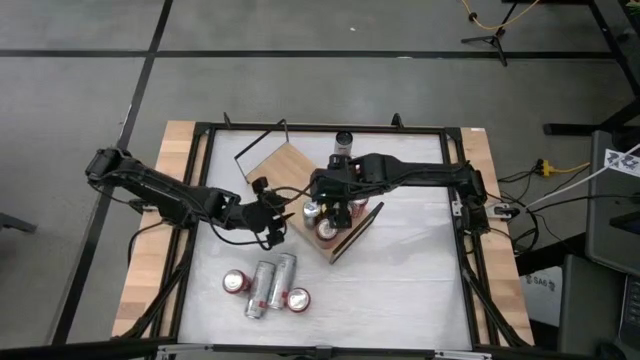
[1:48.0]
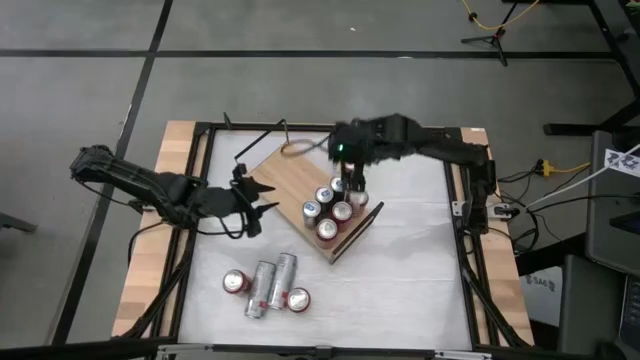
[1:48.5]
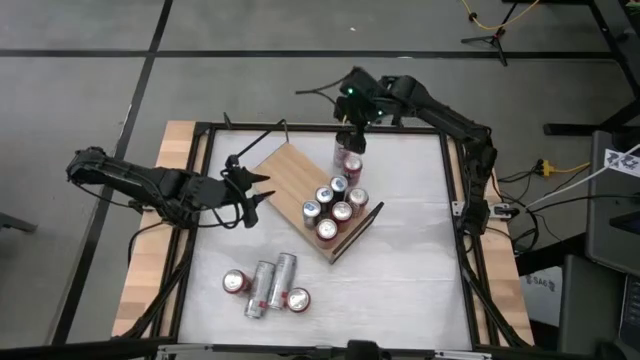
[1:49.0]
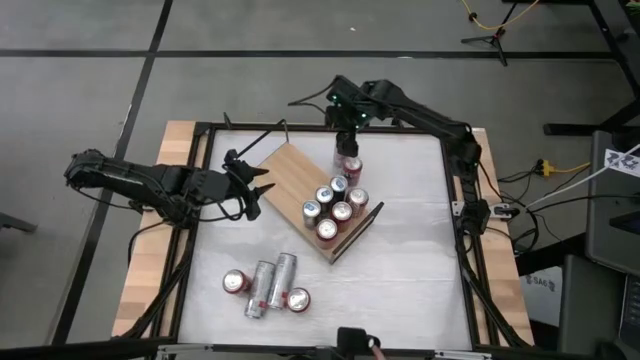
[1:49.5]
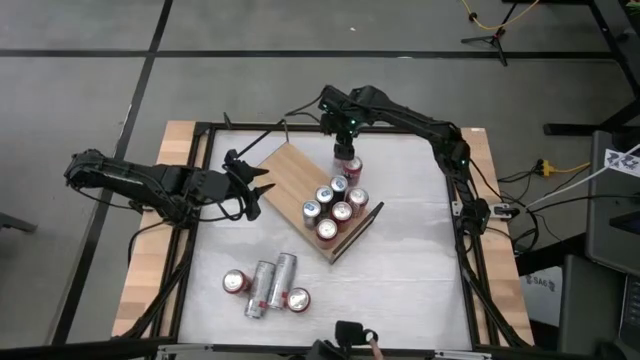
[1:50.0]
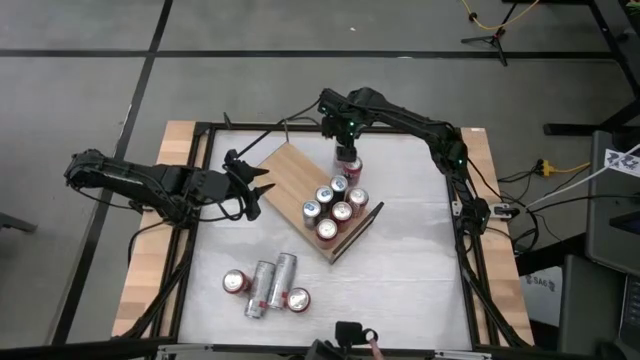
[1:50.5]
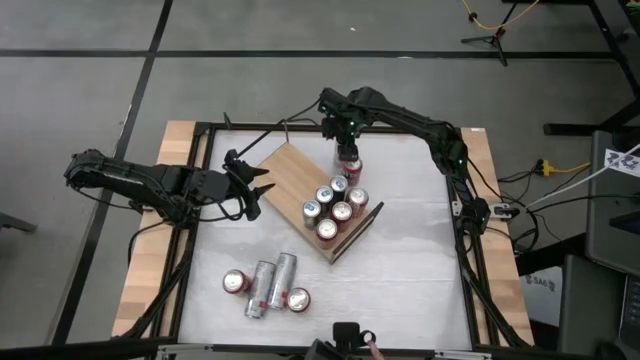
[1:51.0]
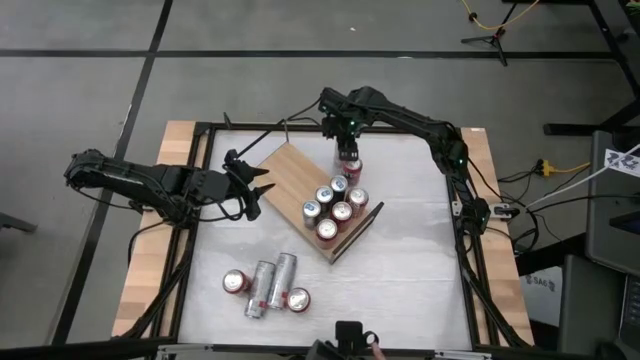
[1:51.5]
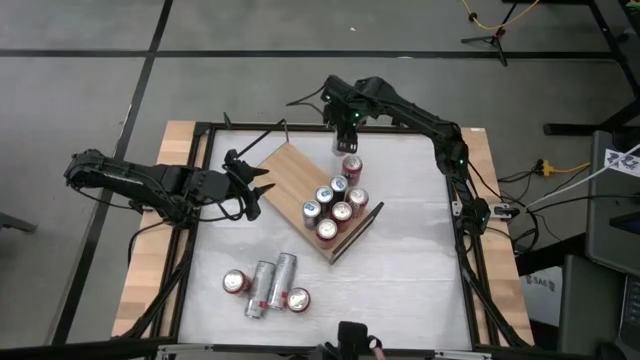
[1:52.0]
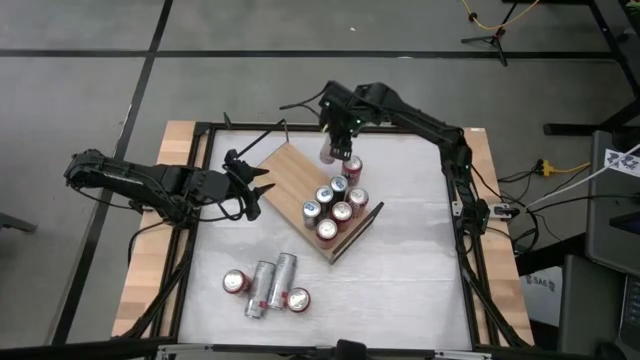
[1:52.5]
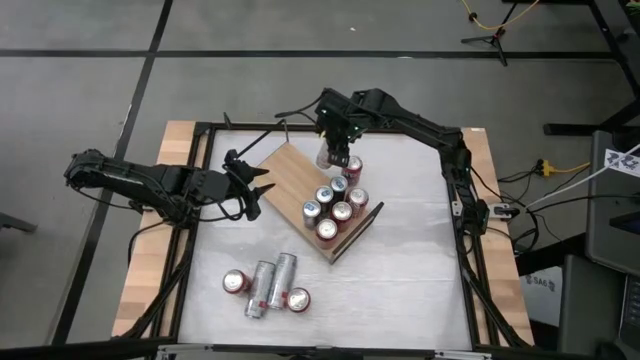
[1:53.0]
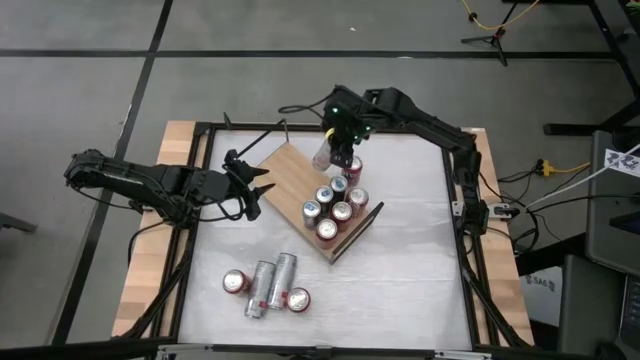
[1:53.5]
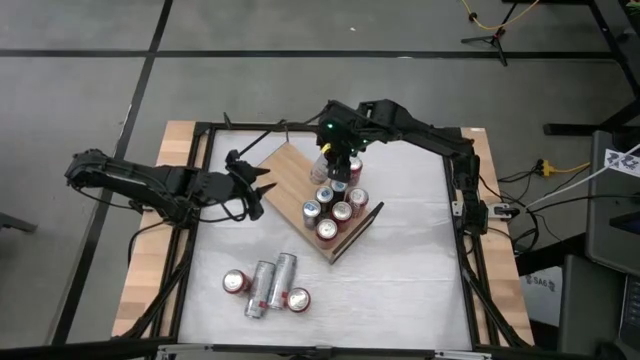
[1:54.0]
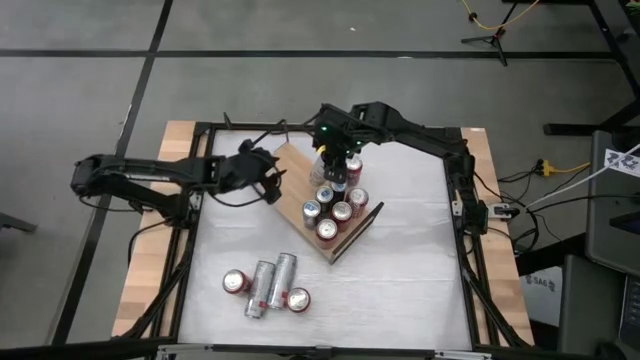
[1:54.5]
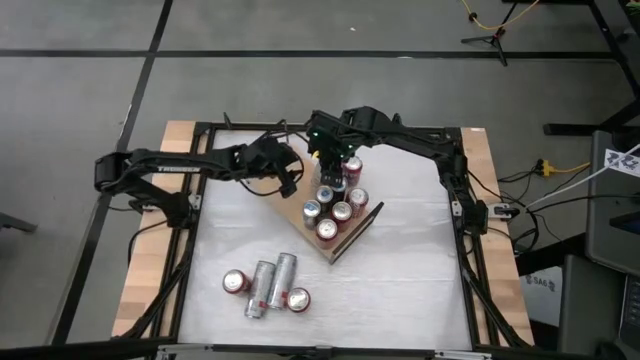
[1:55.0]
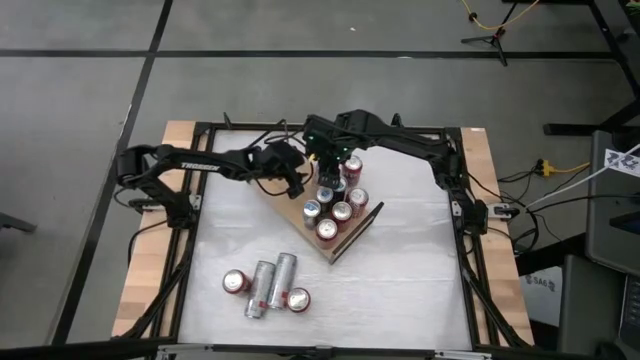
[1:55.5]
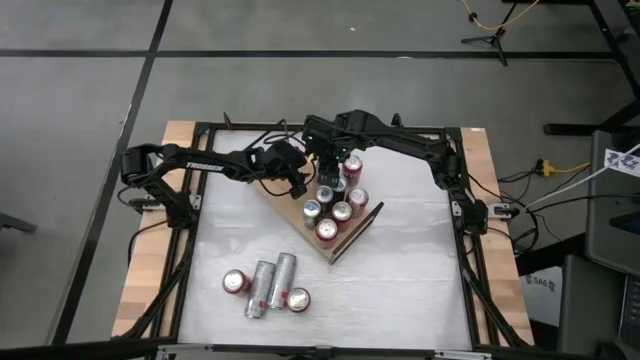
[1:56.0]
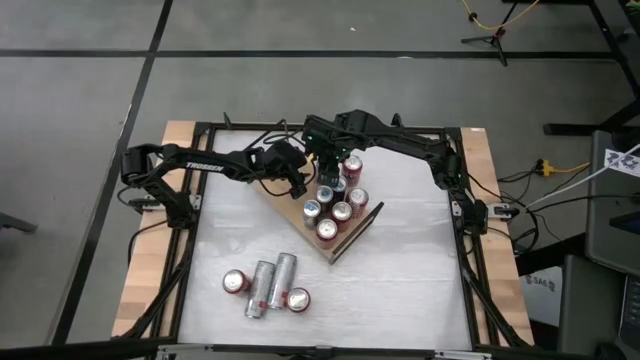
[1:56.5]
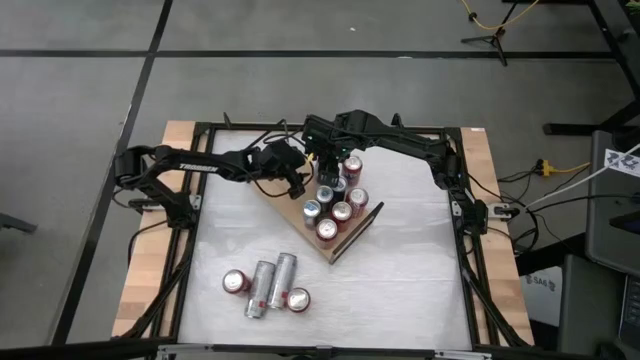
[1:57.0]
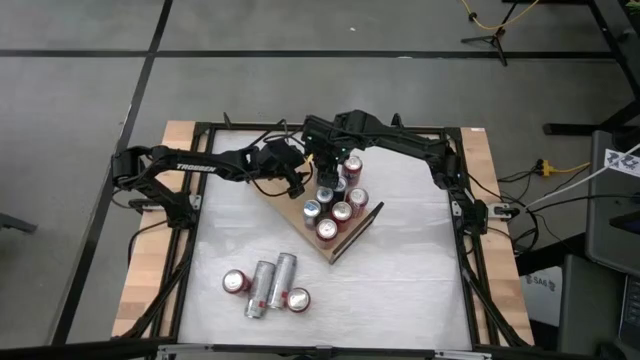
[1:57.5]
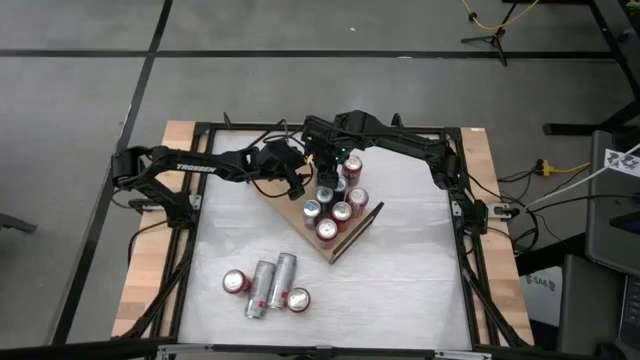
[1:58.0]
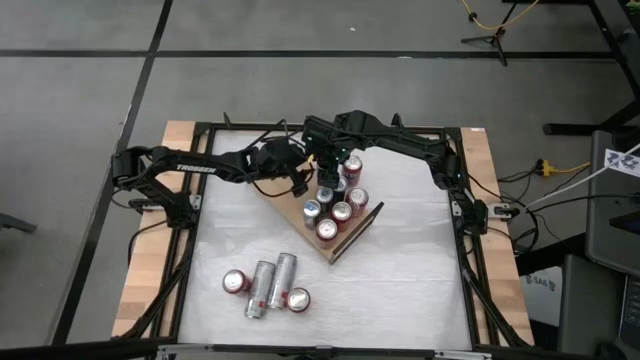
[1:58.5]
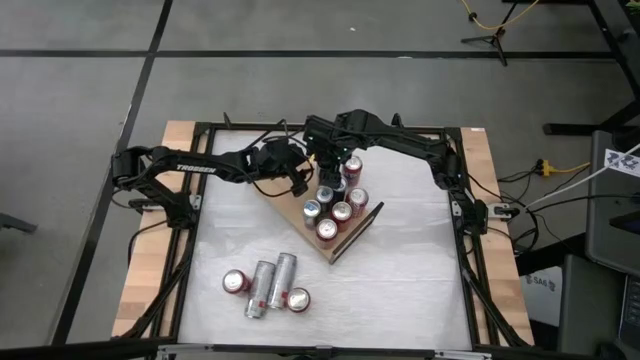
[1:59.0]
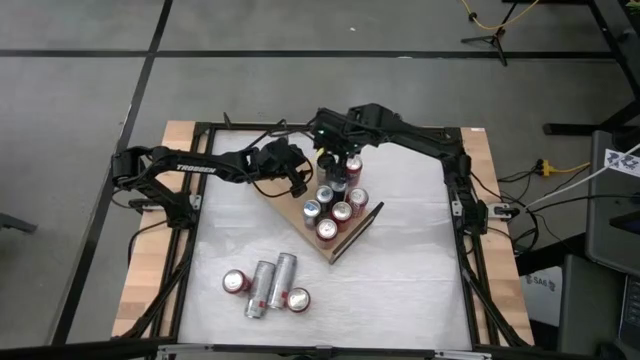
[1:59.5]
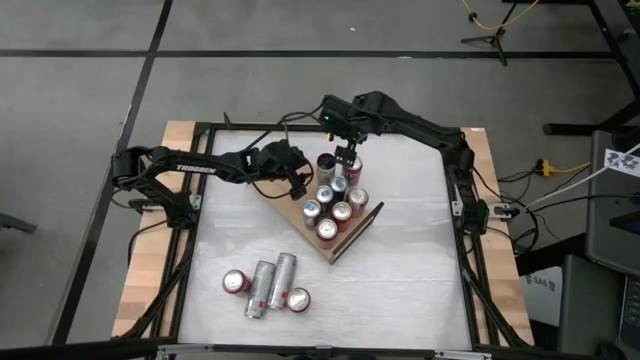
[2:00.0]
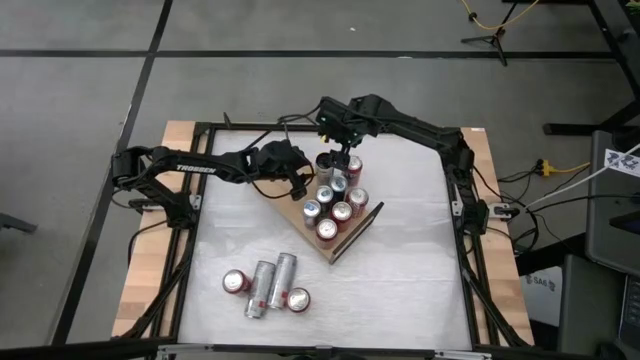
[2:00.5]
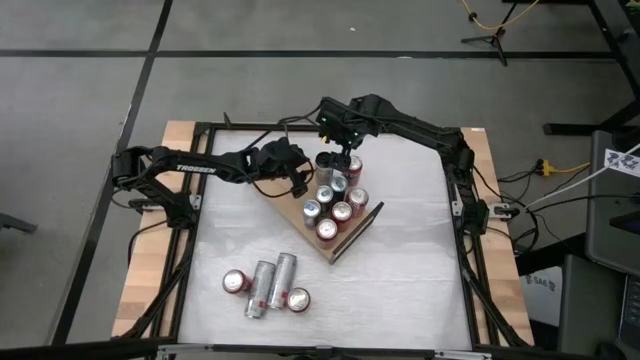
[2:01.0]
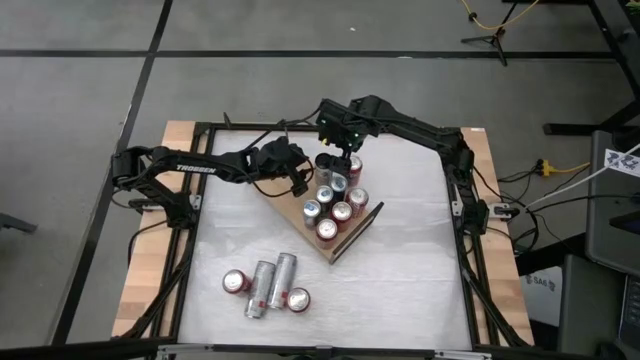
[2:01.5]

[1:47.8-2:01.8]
Task: Place canned beverage on shelf
Put the top right white pink soda can on the shelf

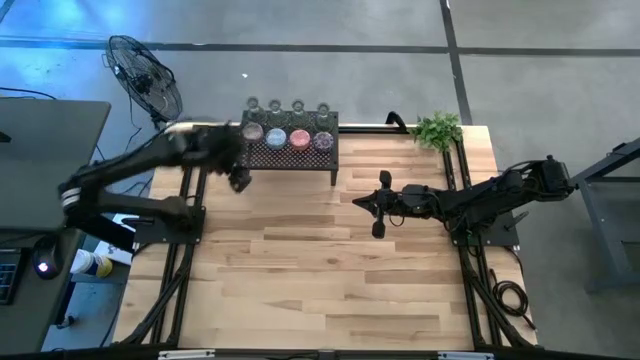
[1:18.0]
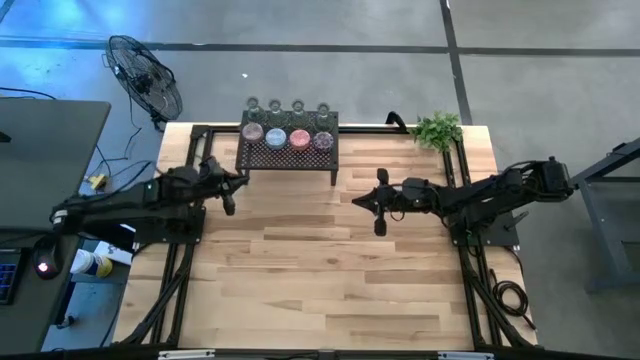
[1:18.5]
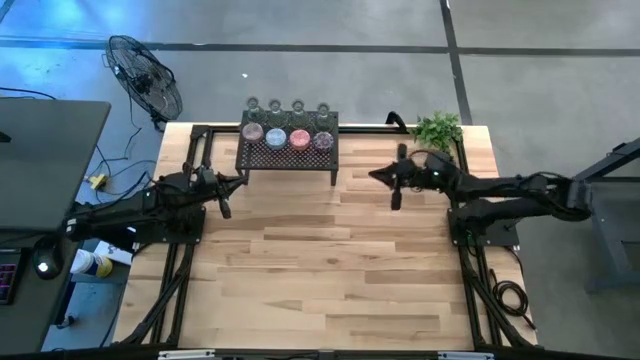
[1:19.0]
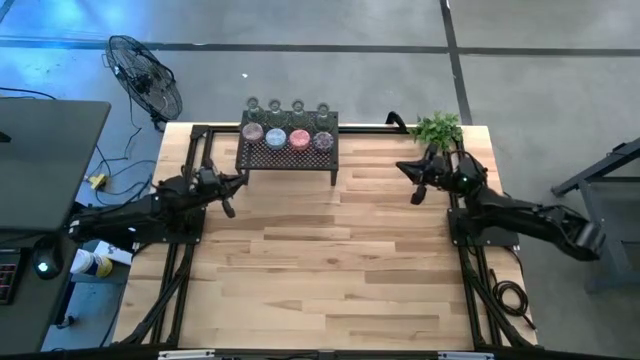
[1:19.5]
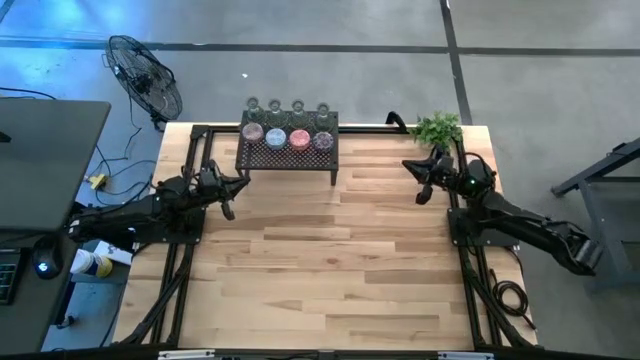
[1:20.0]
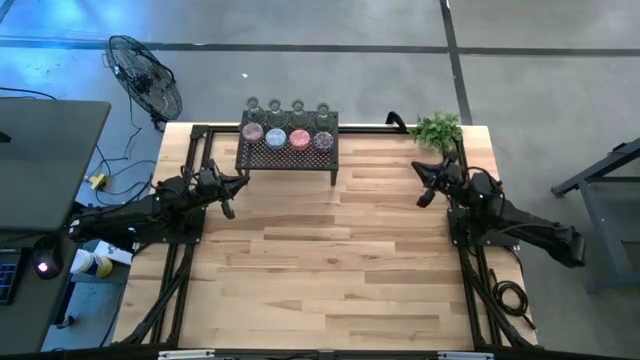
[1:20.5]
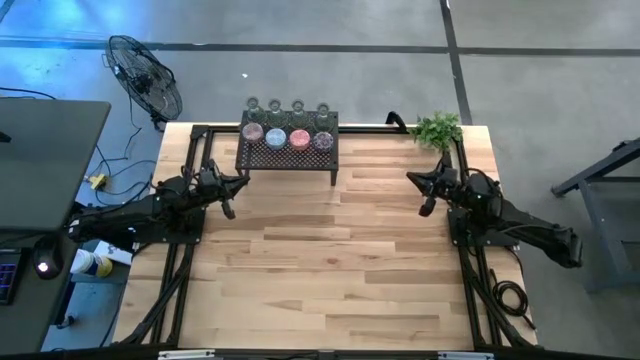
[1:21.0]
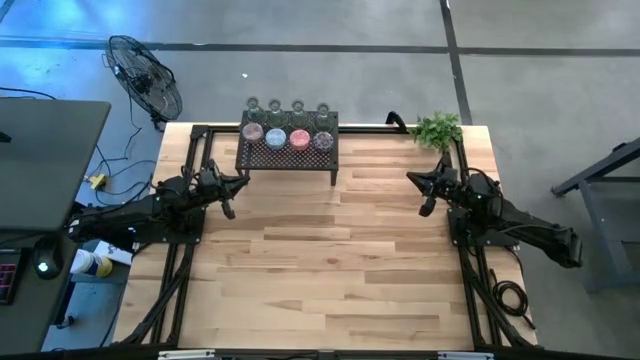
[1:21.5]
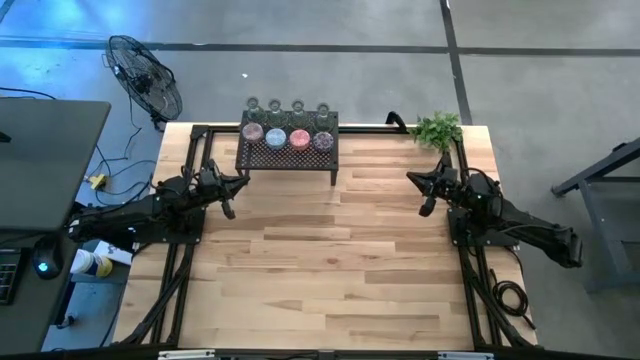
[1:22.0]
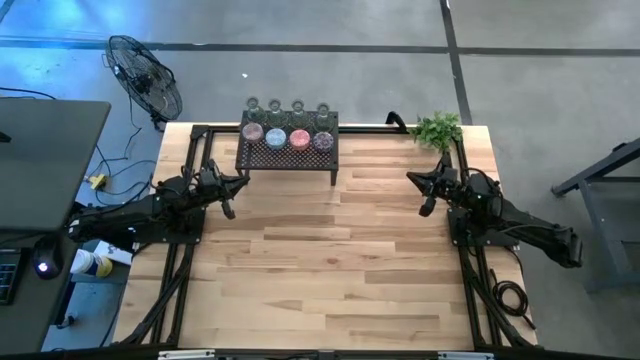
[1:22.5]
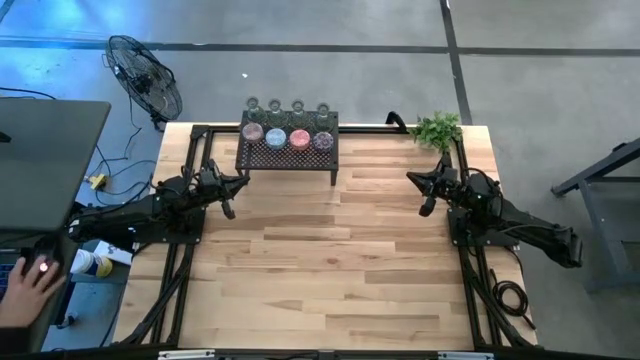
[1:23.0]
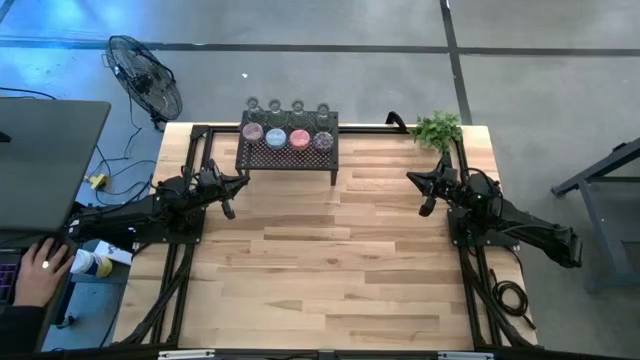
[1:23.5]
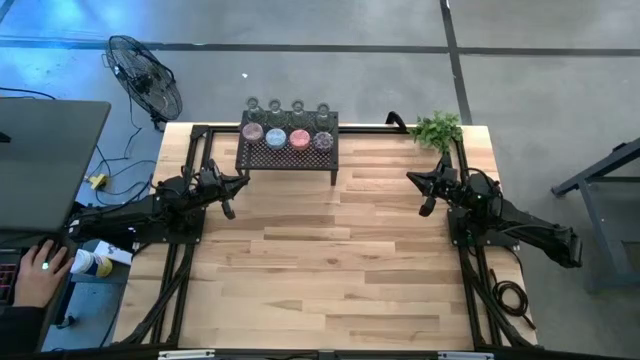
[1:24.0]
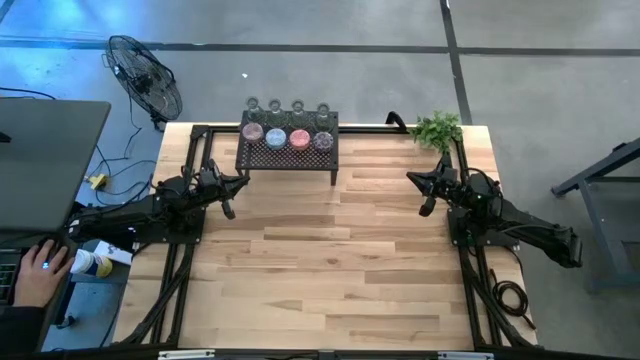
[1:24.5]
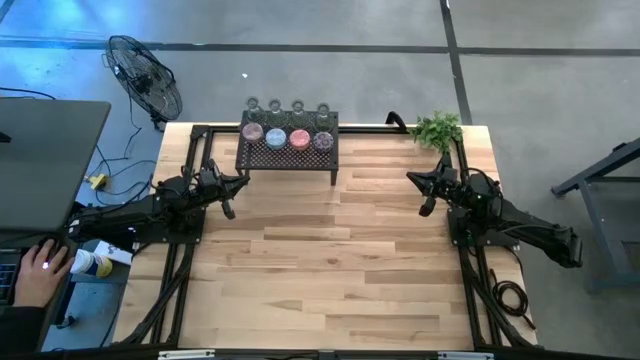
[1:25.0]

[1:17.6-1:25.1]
Task: Pick & Place candle stick holders
Return to Home Position
